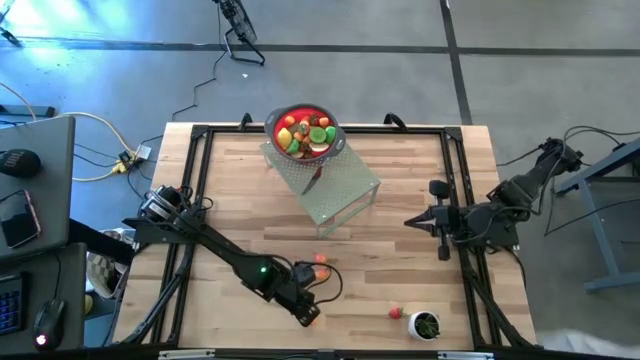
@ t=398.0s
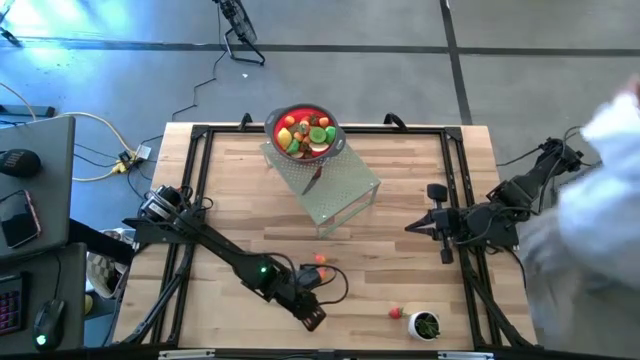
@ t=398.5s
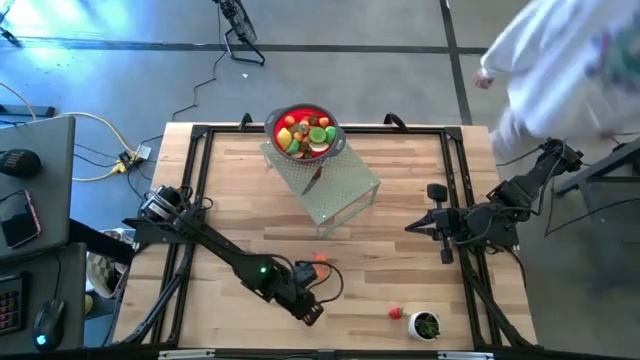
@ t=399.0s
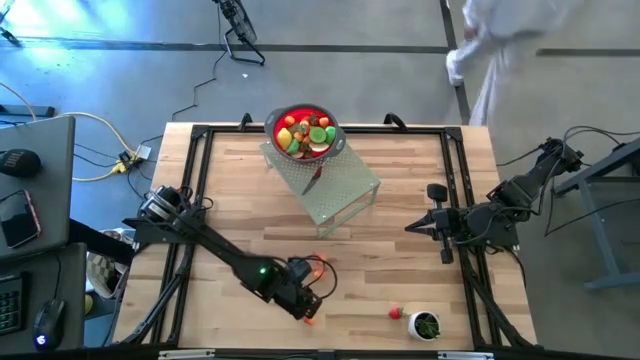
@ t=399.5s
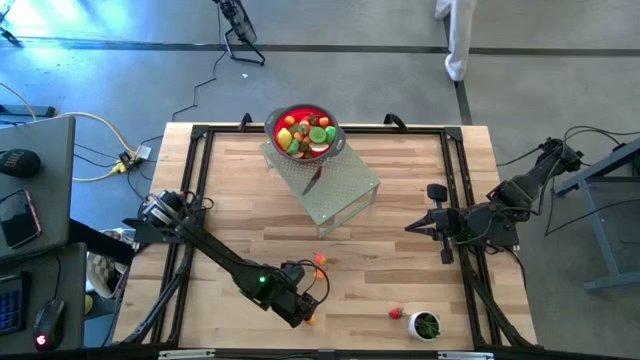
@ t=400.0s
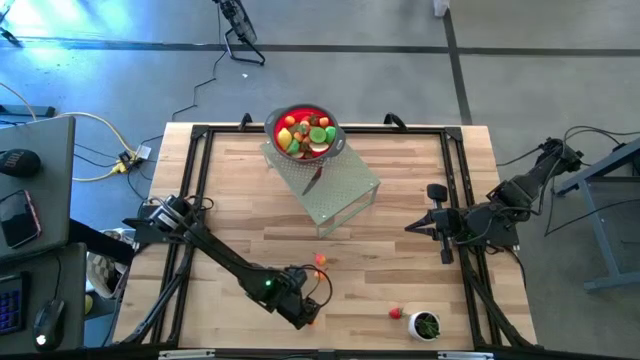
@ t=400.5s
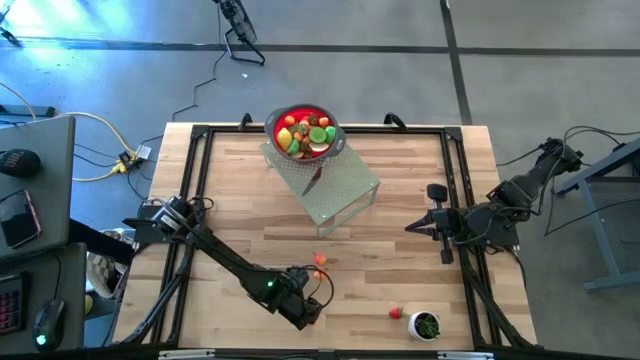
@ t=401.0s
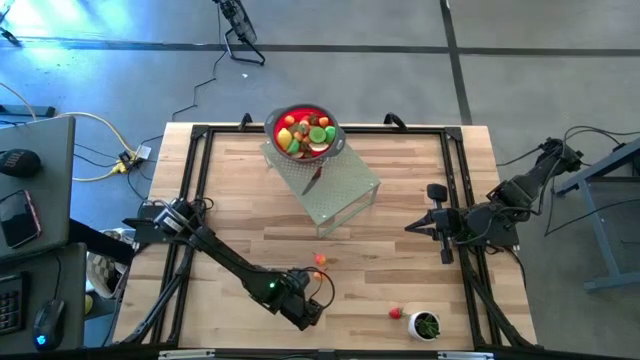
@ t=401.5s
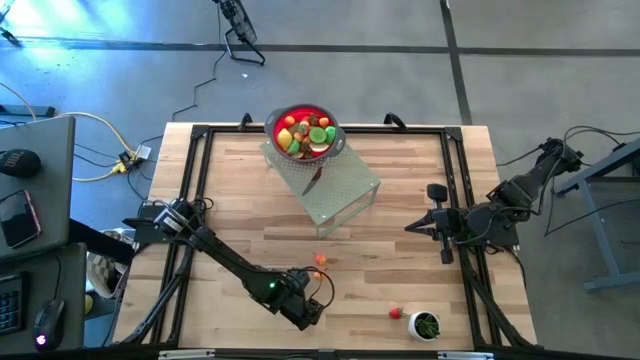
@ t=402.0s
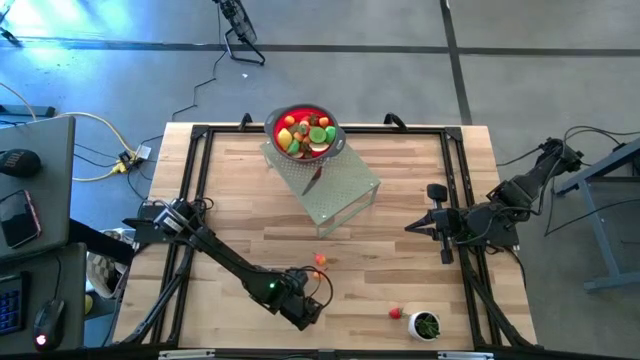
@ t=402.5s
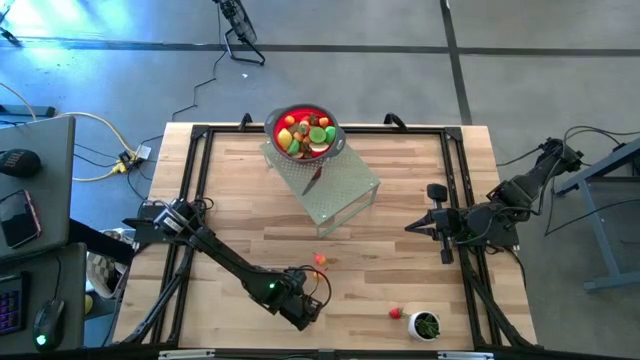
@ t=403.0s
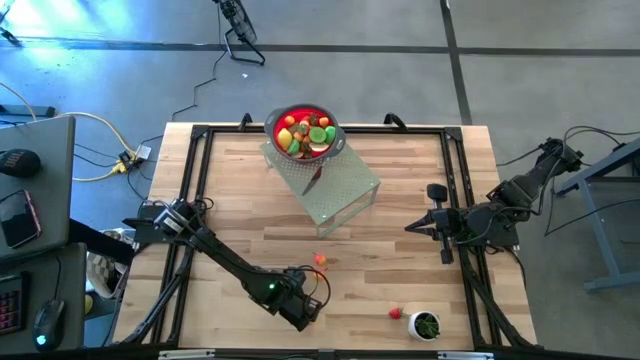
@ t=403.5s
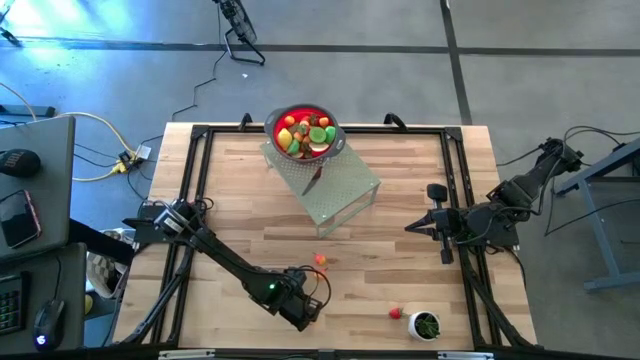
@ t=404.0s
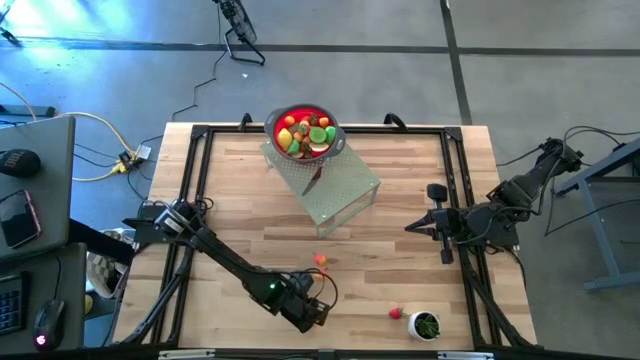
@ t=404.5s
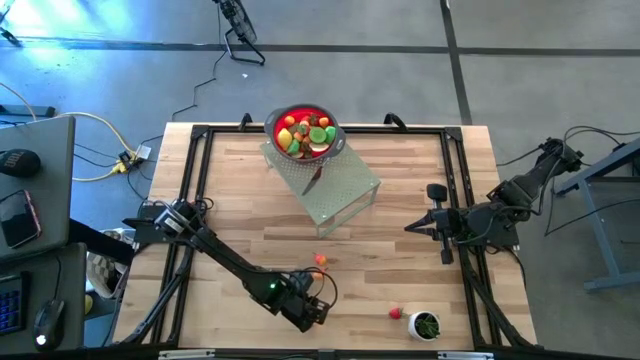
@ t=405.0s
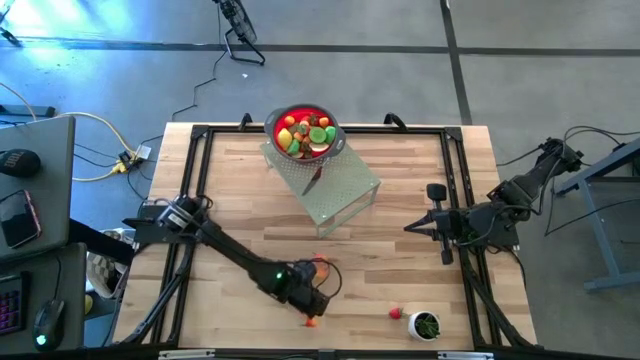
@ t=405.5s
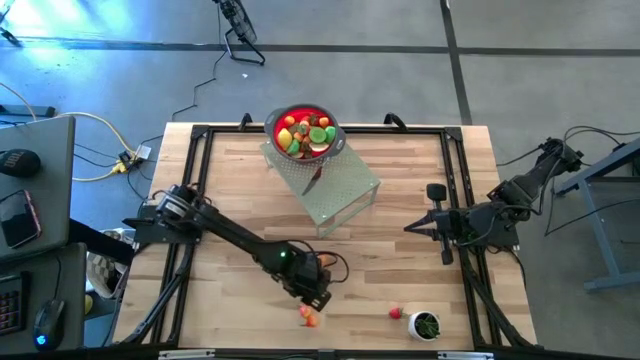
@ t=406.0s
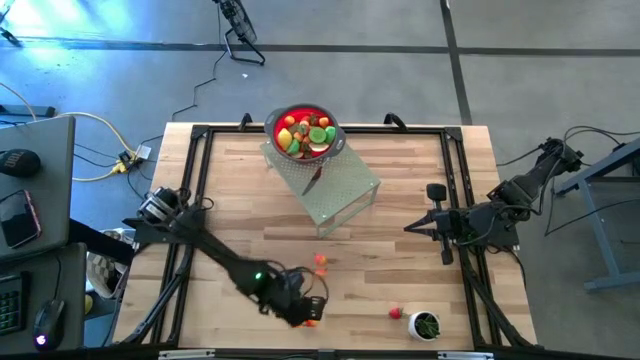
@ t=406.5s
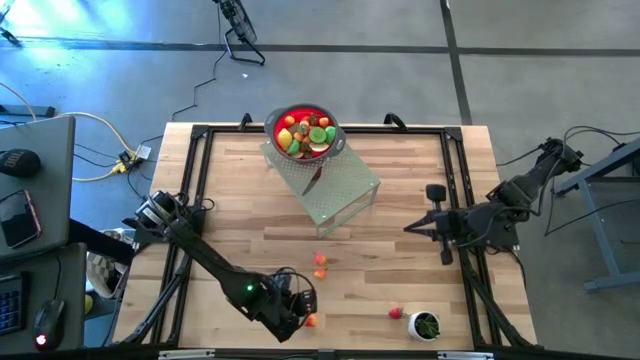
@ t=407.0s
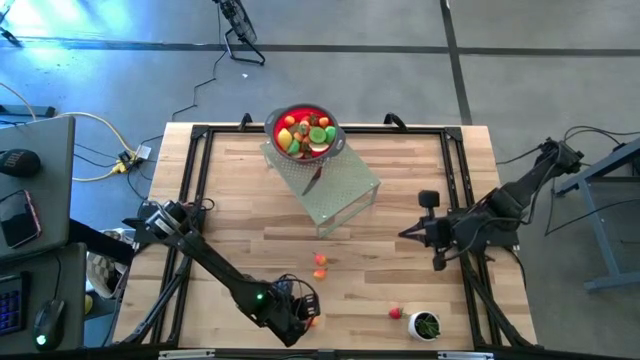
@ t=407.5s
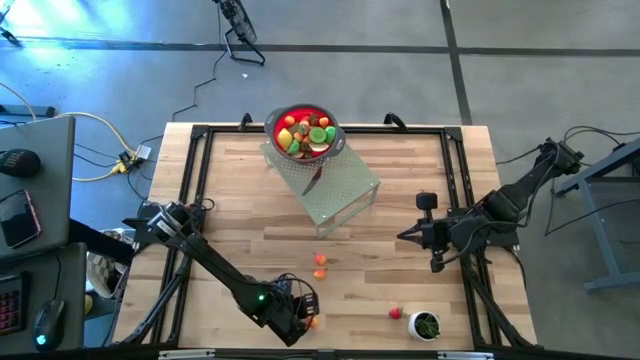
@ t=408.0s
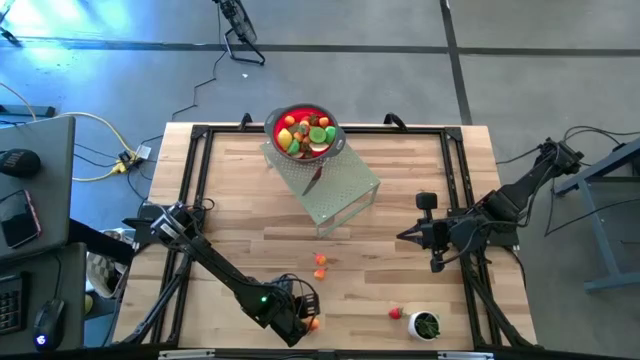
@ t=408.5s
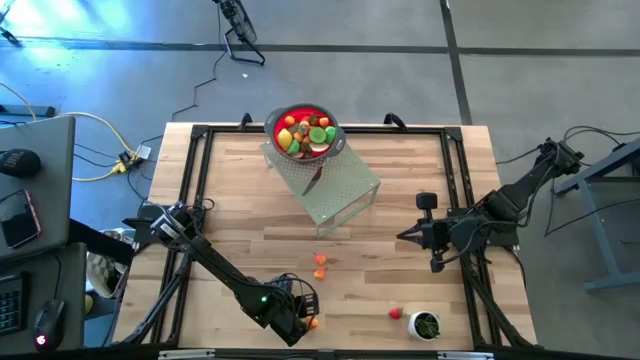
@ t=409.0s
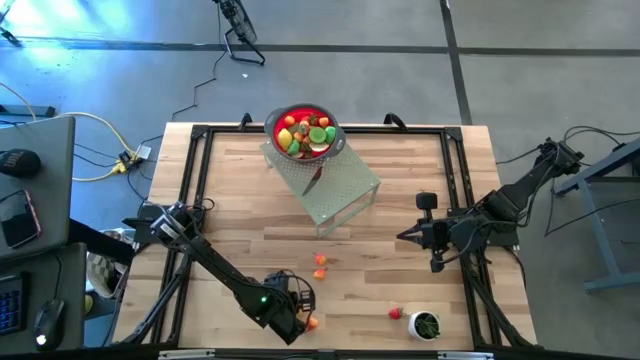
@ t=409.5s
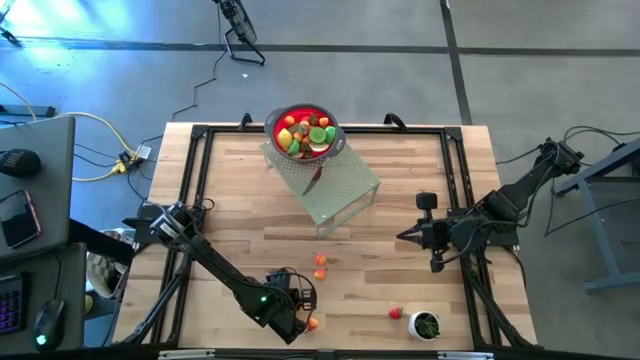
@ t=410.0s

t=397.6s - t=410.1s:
Task: Pick & Place Fruit
Put the orange pear into the red strainer on the shelf

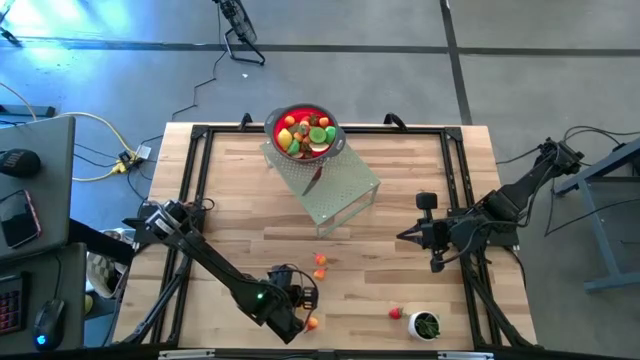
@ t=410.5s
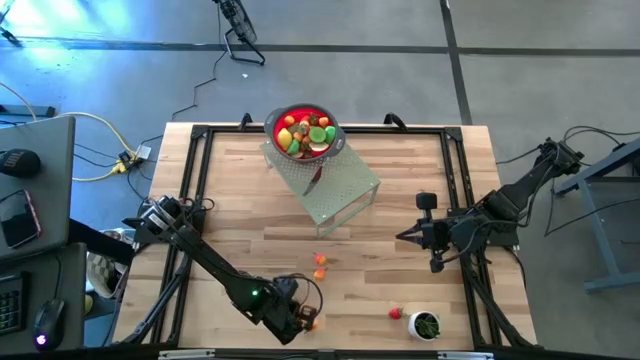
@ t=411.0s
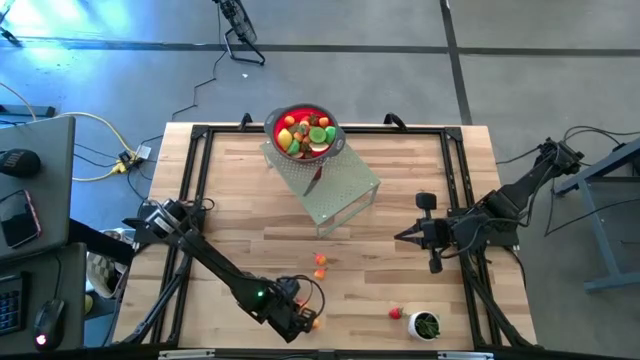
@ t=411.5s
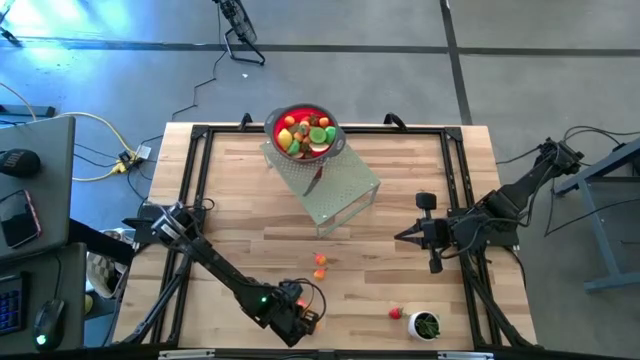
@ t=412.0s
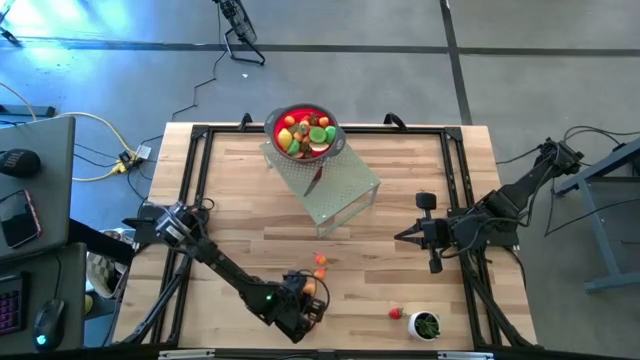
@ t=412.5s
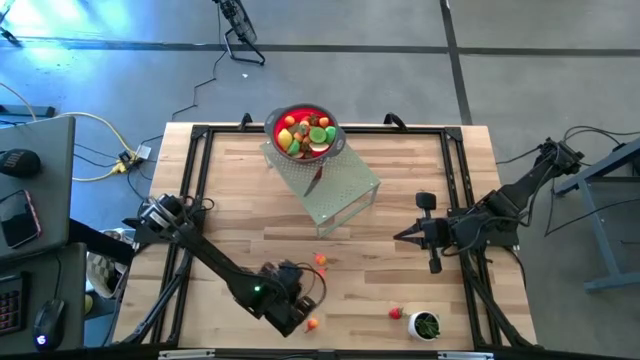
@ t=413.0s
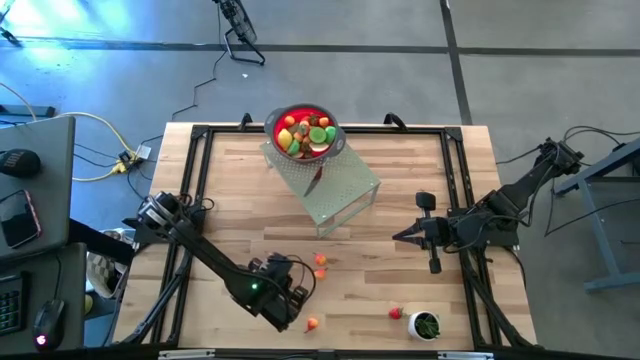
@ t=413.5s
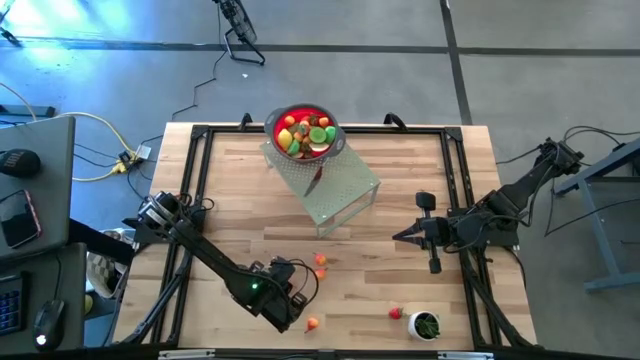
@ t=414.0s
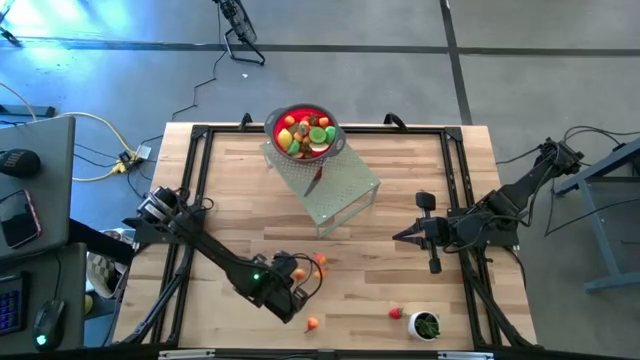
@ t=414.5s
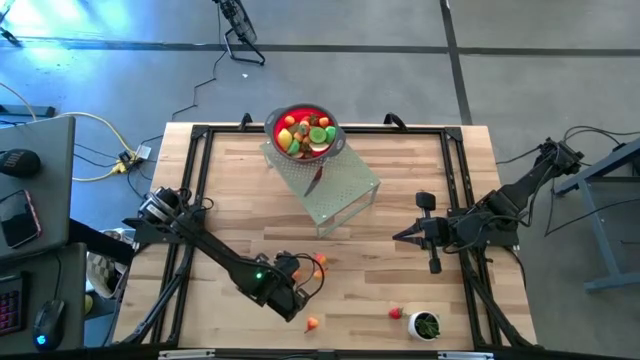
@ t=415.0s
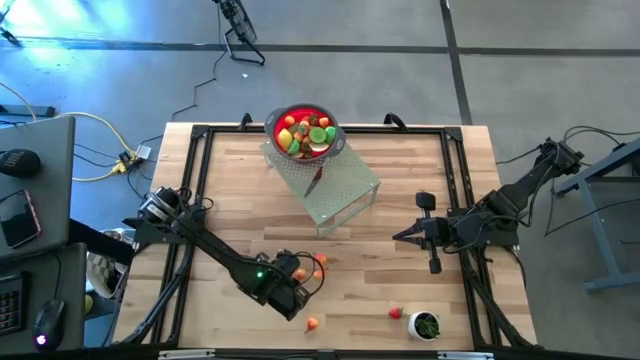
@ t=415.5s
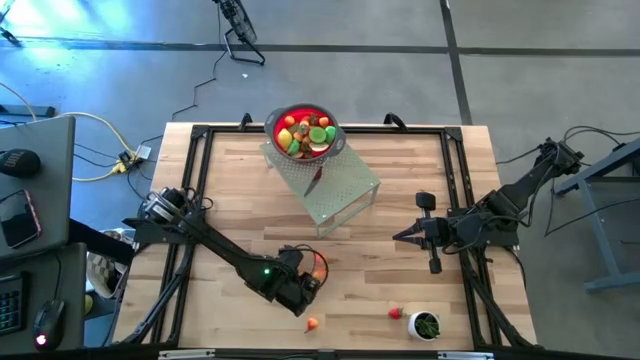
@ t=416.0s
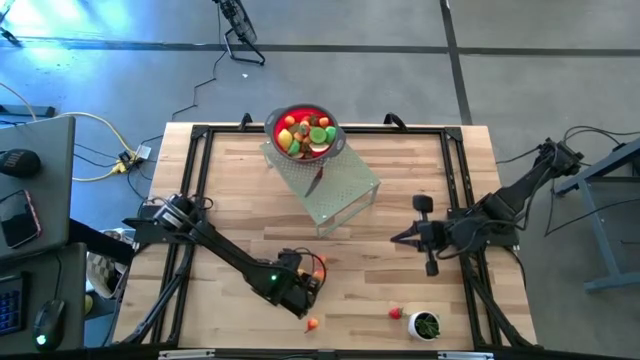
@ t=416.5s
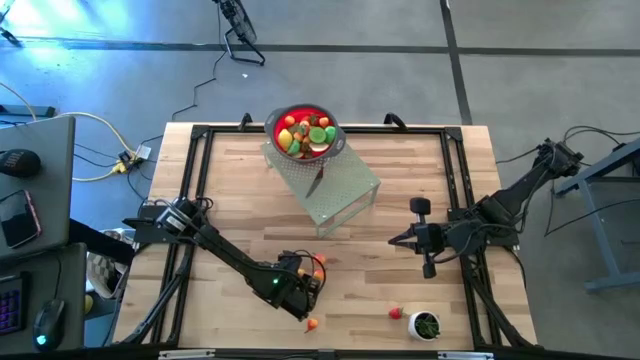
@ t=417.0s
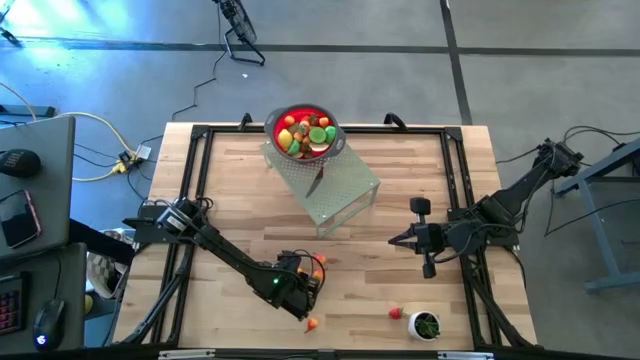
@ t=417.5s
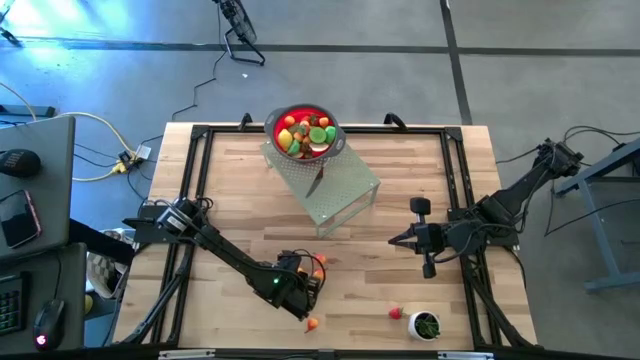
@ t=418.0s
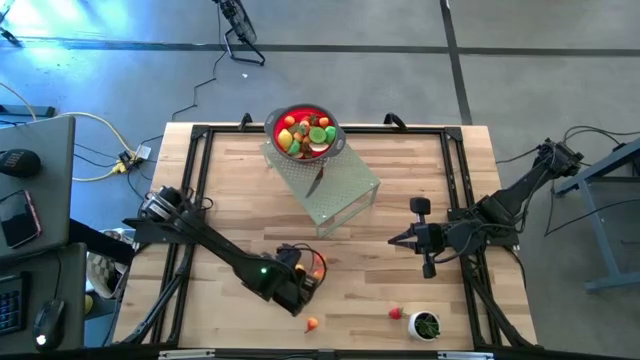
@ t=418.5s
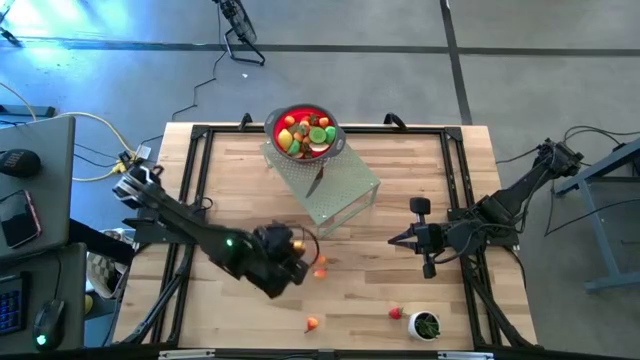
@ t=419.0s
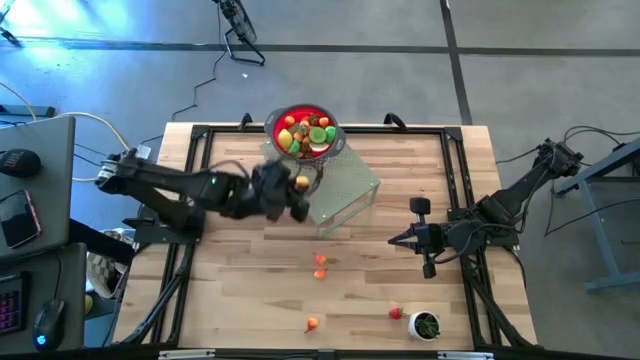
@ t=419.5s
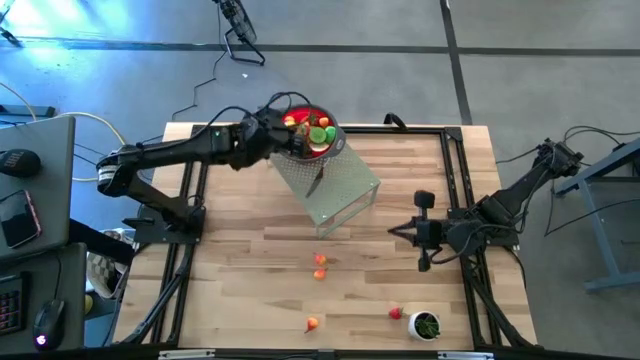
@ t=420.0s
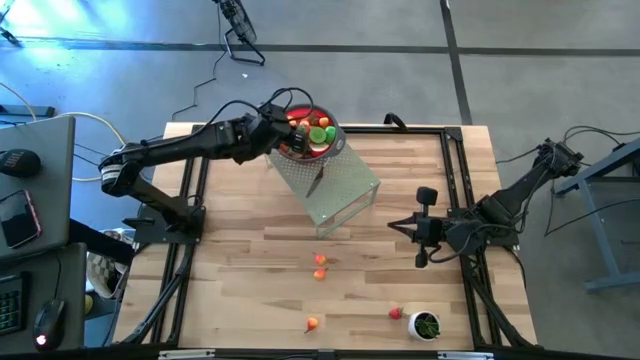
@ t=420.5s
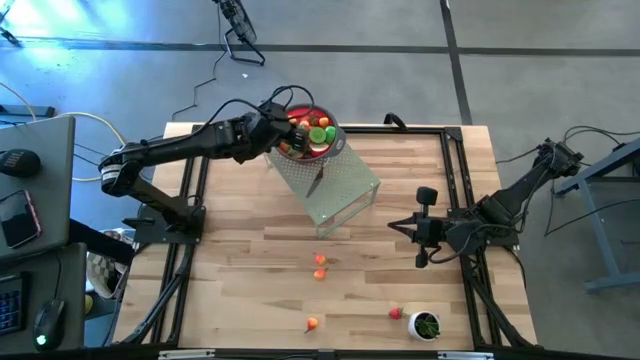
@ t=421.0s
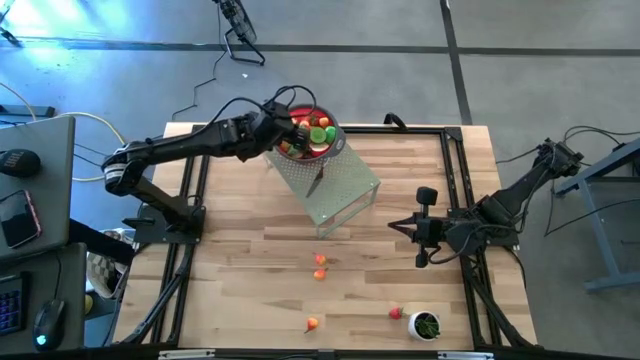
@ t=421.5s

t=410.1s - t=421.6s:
Put the orange pear into the red strainer on the shelf
